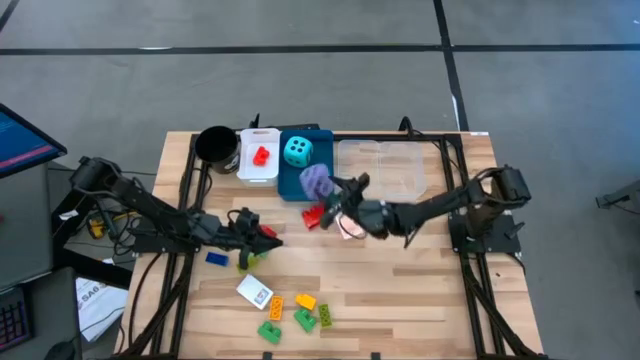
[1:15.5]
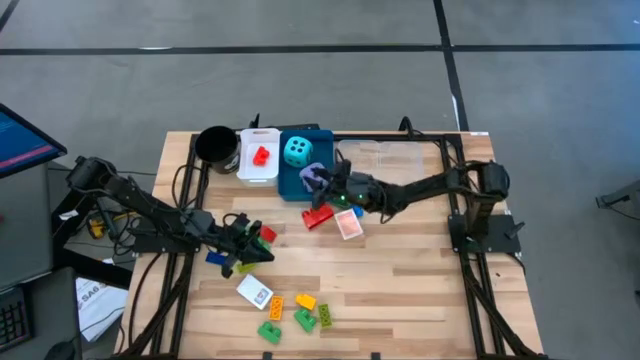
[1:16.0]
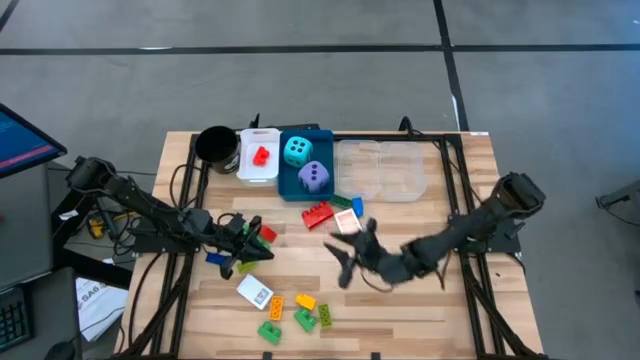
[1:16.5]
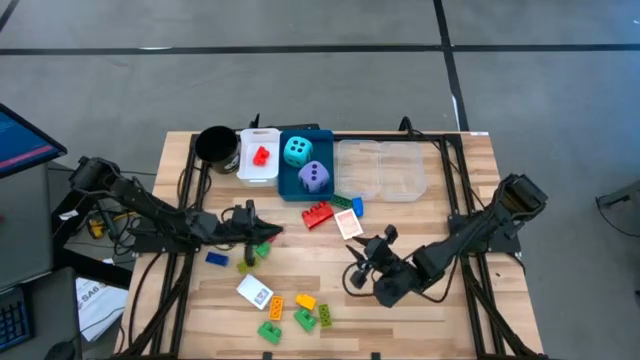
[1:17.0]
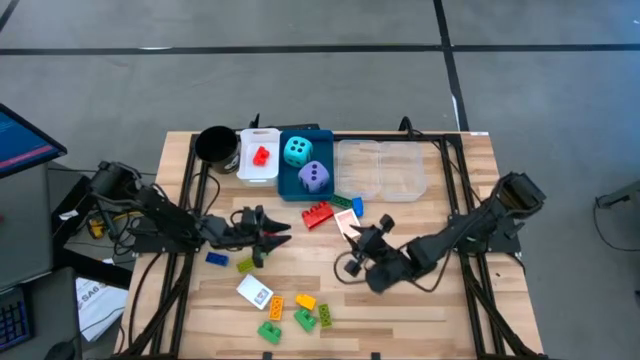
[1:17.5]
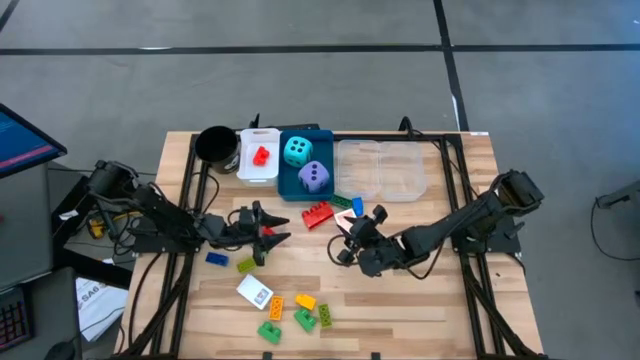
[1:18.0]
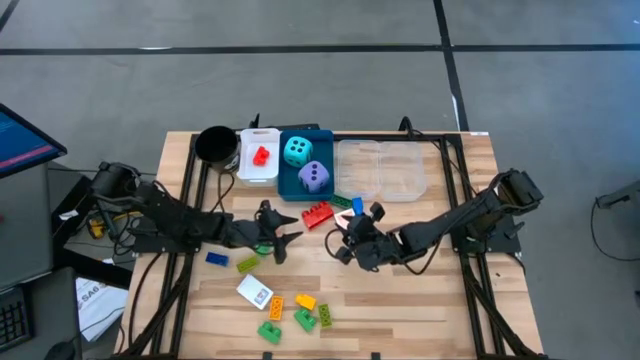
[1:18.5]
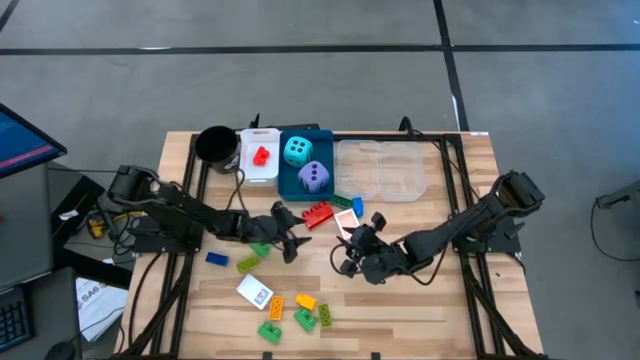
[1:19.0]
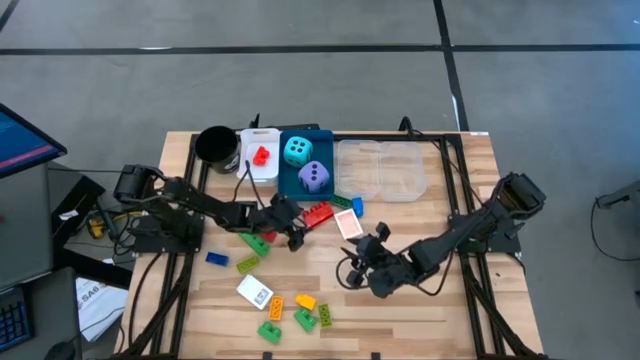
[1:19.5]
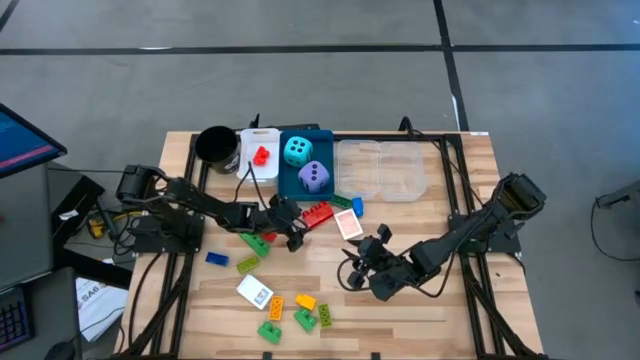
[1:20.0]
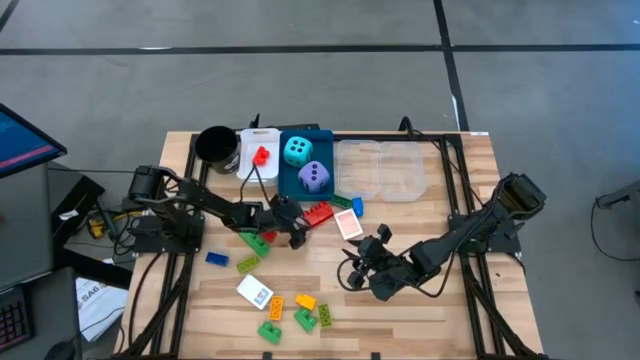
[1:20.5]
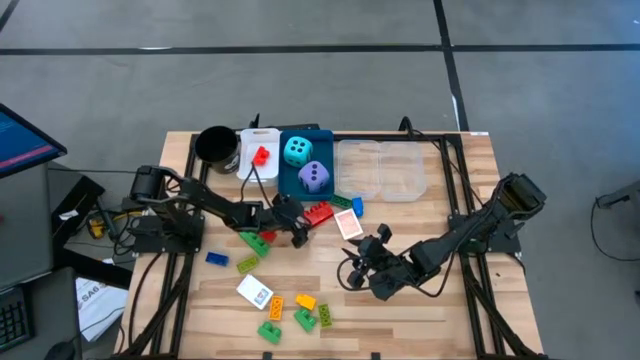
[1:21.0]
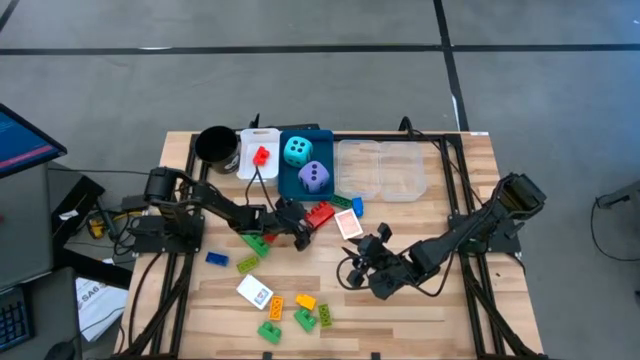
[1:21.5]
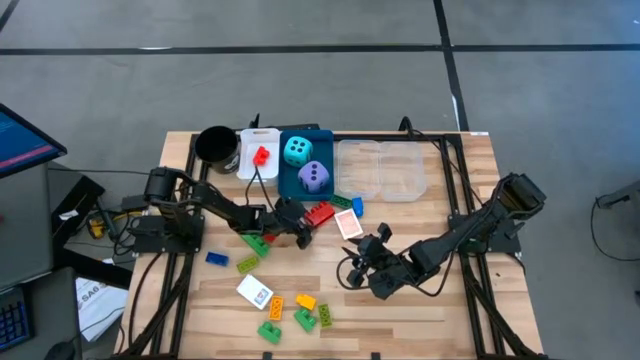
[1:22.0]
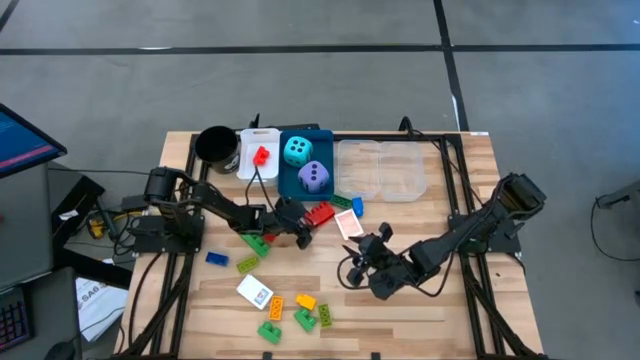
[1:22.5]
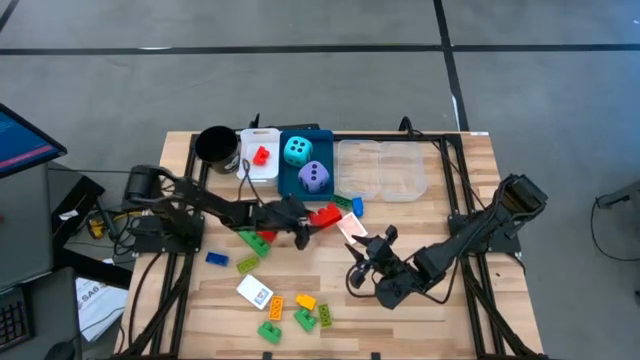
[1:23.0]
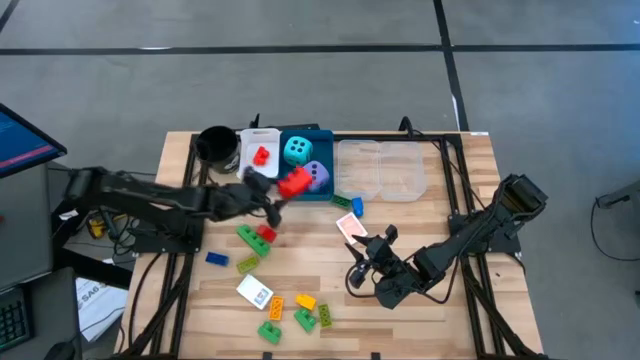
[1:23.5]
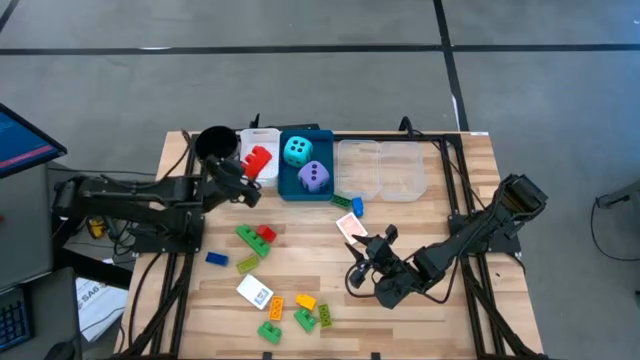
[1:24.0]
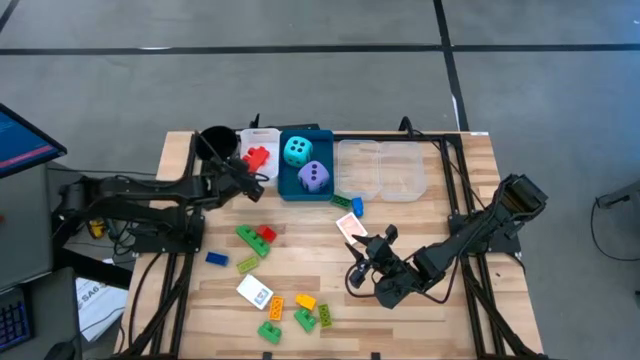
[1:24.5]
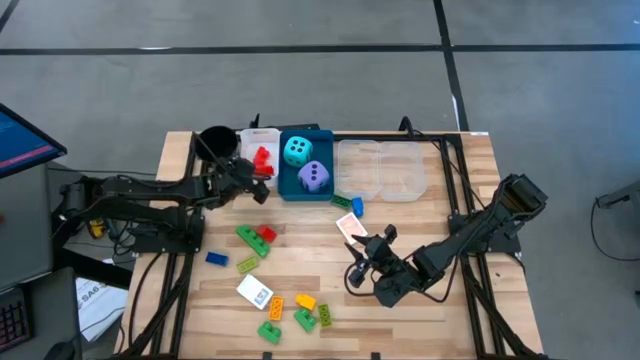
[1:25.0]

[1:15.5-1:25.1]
Task: Pick & Place Toys
Put the large red game piece into the white bin

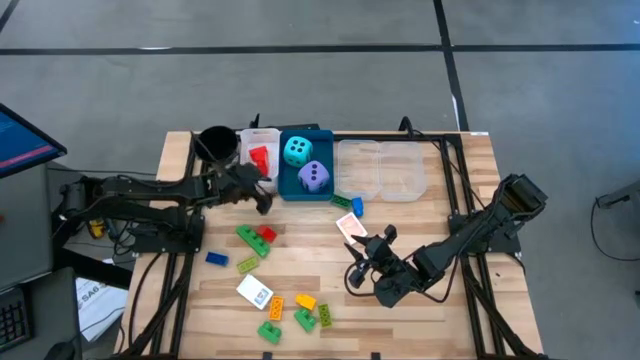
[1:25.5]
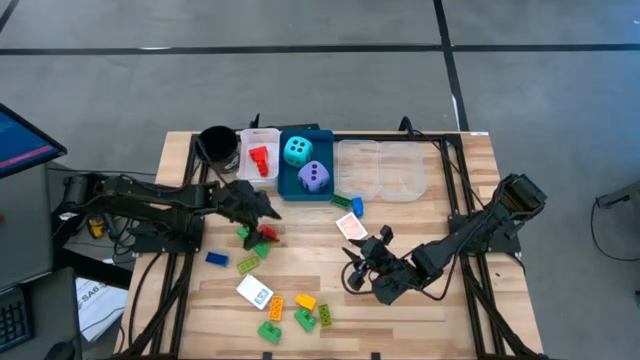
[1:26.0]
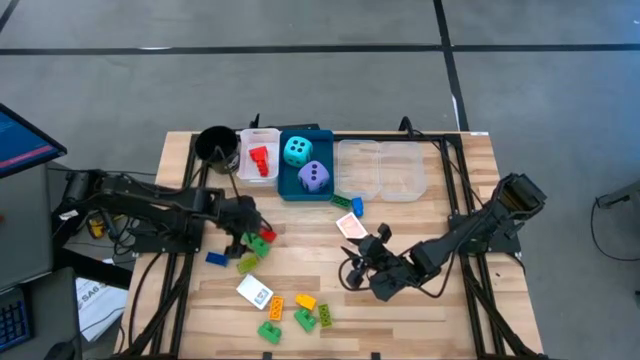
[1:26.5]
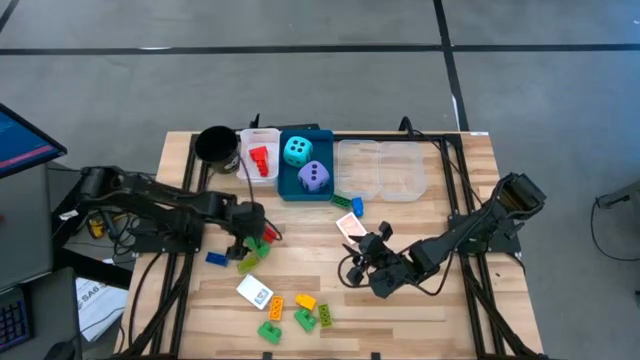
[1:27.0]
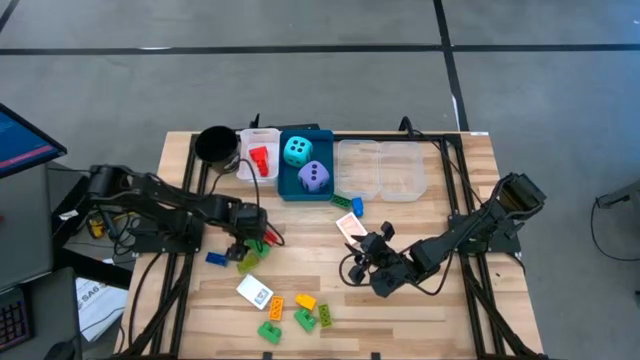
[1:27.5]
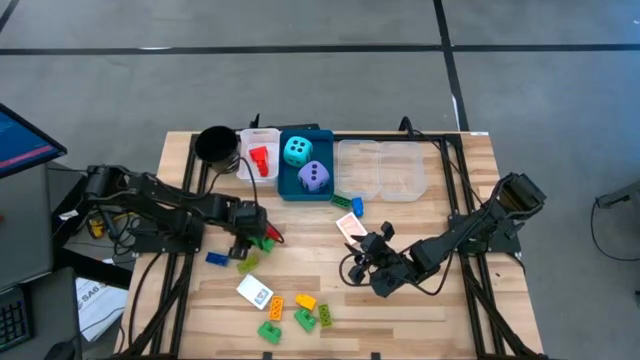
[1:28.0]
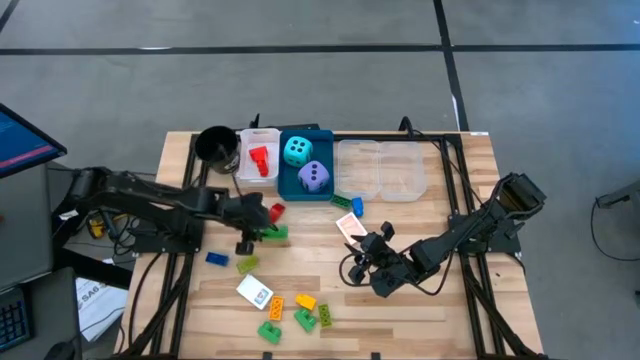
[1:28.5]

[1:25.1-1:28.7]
Put the large green game piece into the white bin

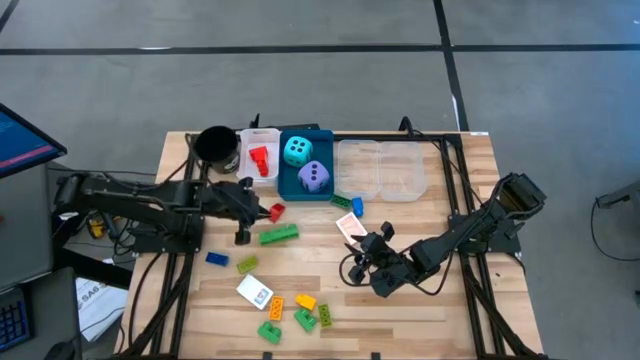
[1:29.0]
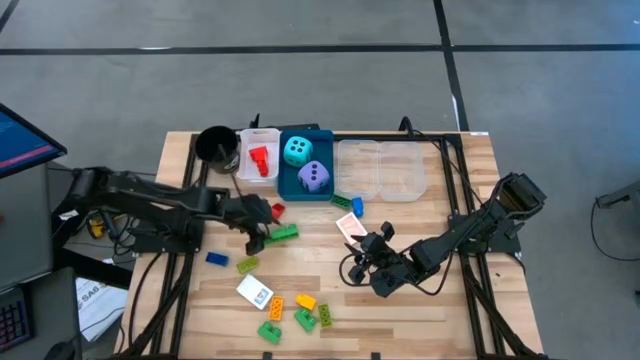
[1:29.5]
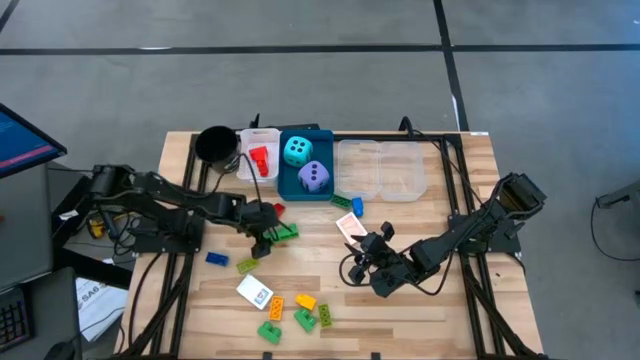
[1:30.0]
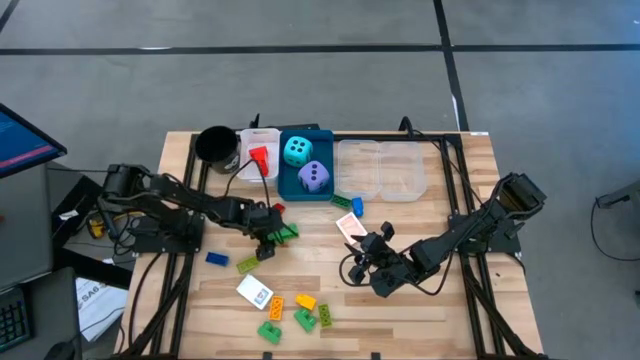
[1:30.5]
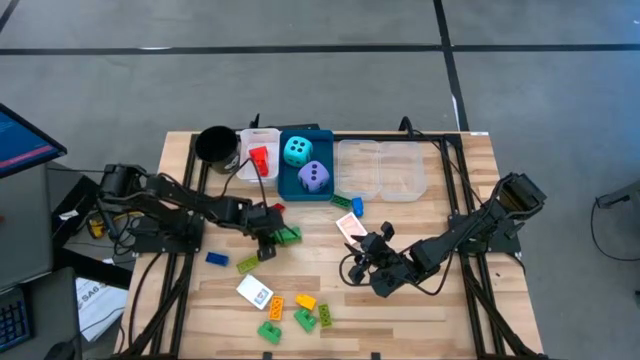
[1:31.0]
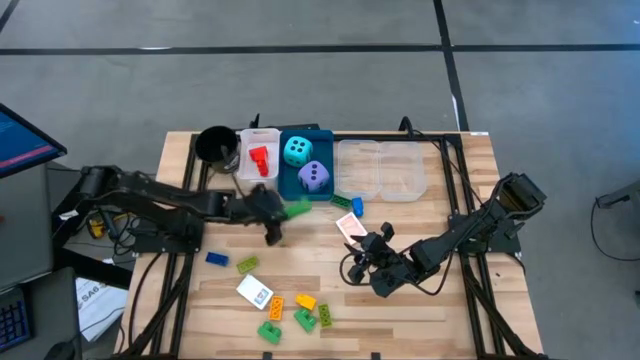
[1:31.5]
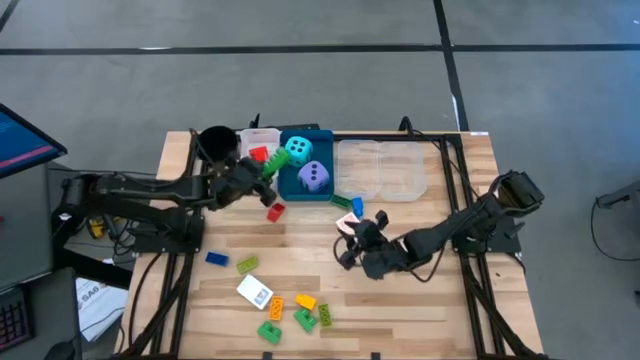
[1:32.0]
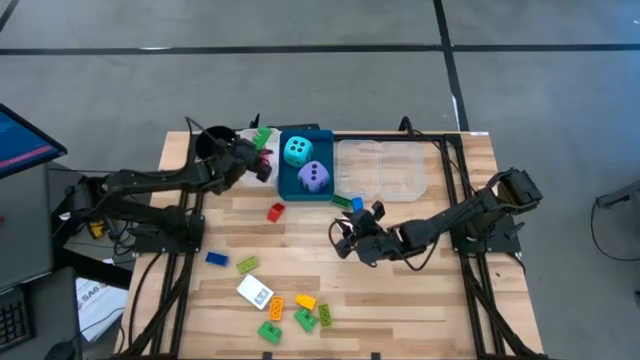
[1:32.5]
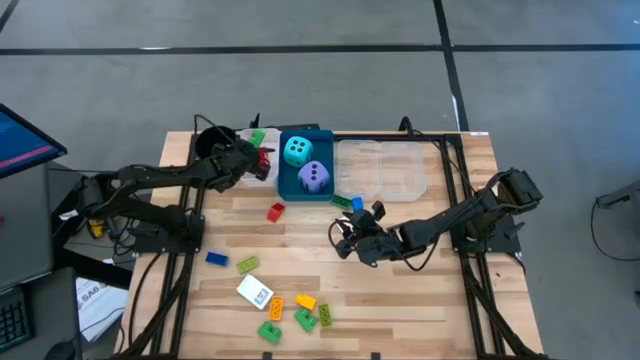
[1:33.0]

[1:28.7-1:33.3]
Put the large green game piece into the white bin

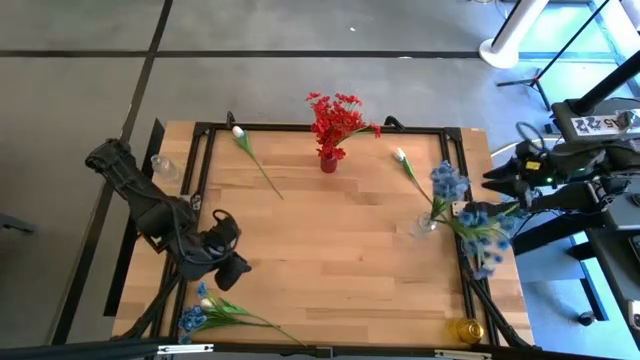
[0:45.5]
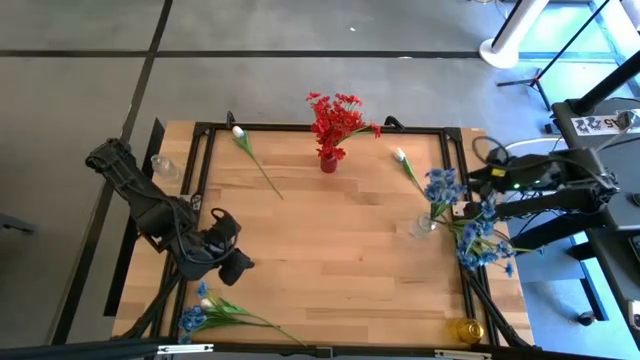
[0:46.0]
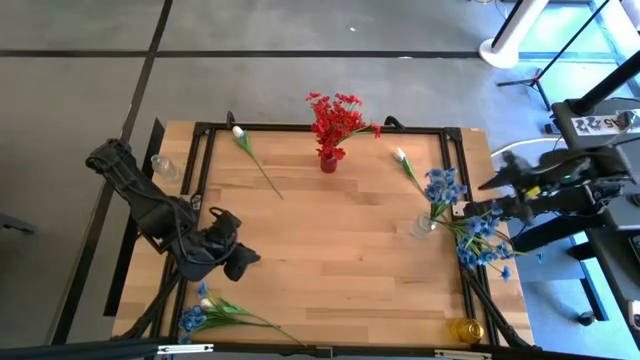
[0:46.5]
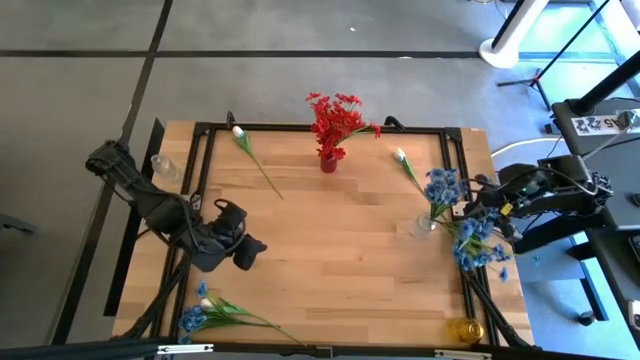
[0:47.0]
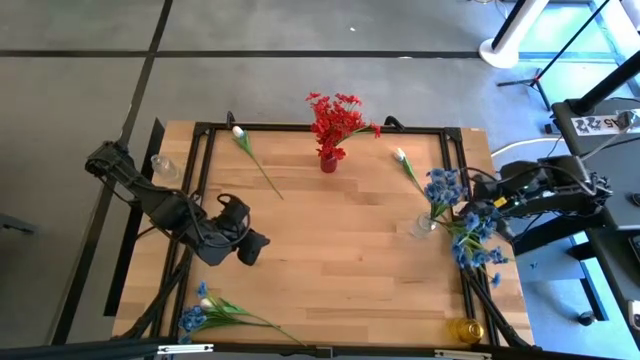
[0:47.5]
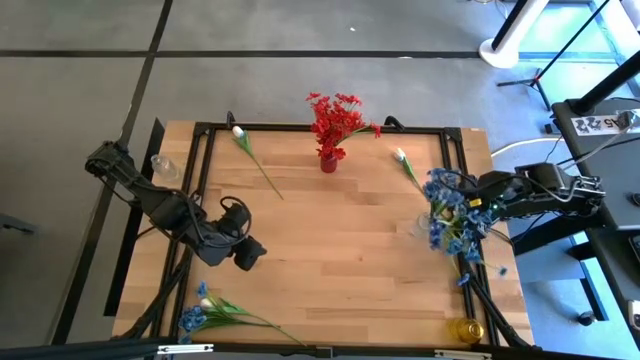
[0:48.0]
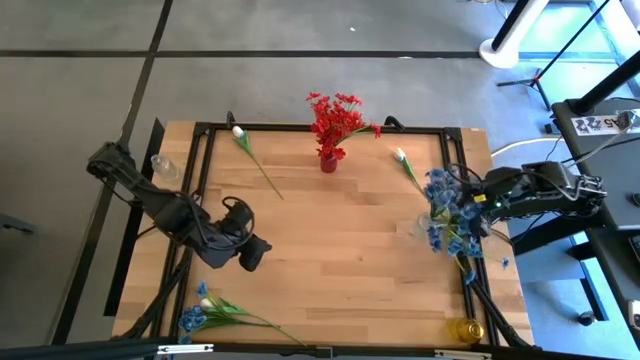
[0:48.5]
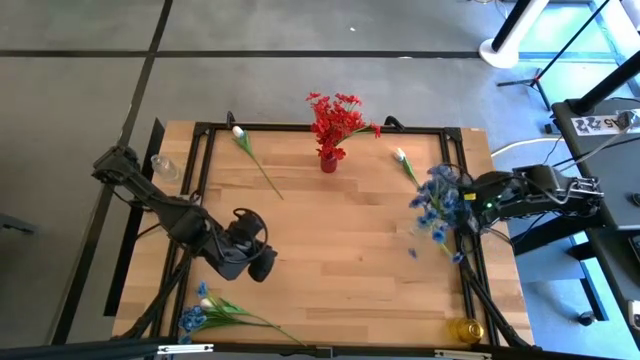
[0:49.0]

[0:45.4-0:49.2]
Task: Sort flowers into vase by color
Adjust the blue flowers on the transparent vase
